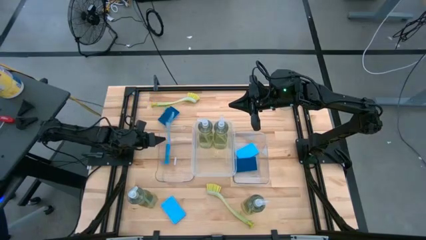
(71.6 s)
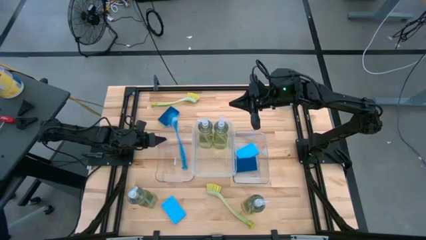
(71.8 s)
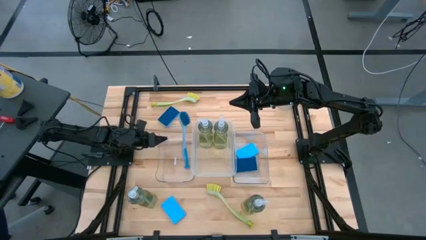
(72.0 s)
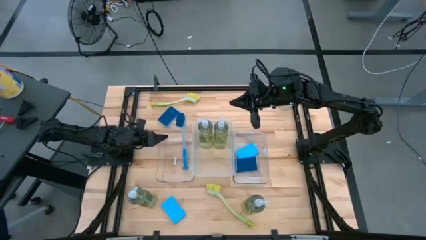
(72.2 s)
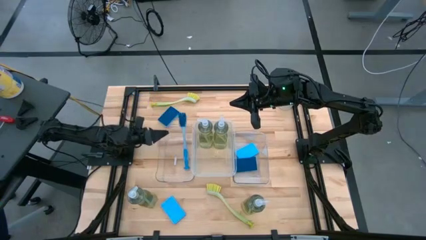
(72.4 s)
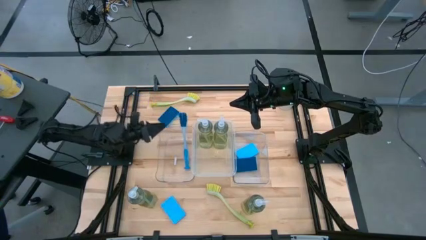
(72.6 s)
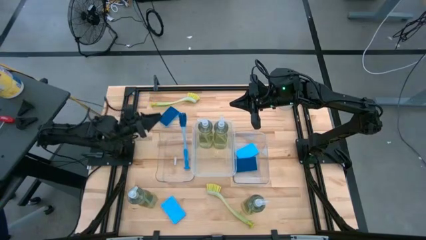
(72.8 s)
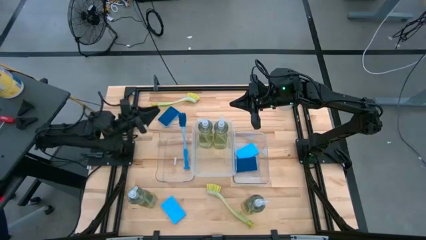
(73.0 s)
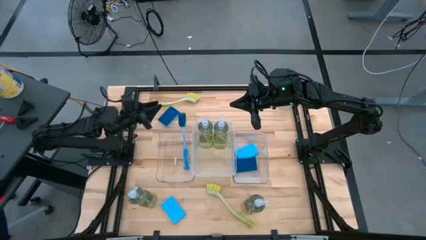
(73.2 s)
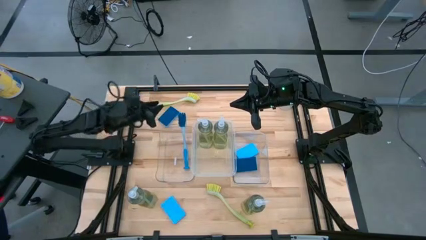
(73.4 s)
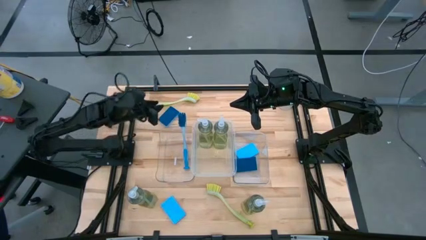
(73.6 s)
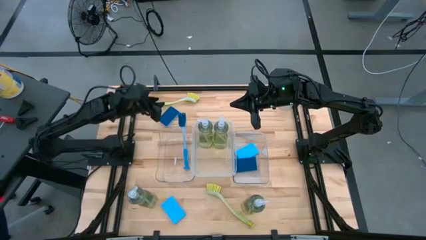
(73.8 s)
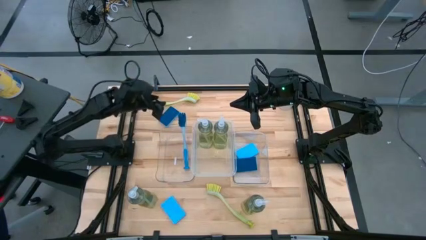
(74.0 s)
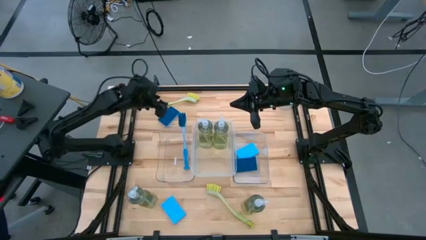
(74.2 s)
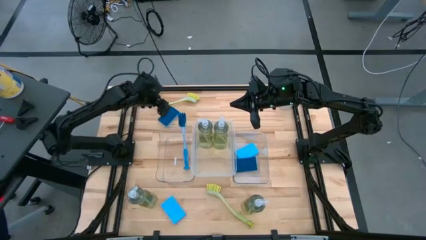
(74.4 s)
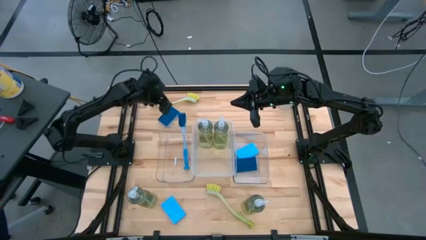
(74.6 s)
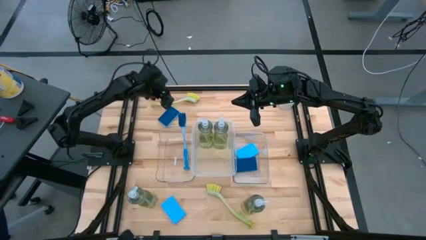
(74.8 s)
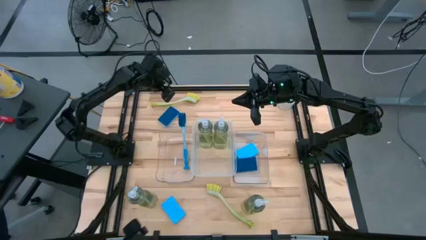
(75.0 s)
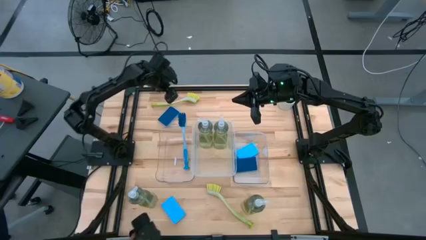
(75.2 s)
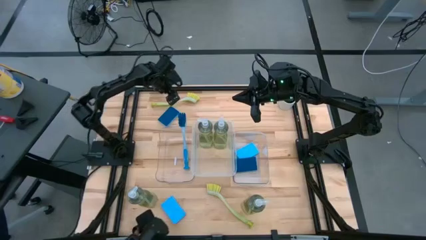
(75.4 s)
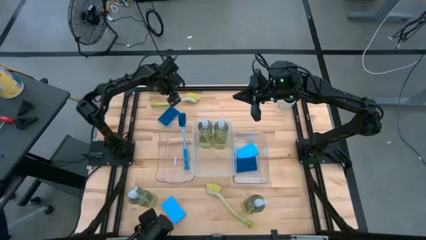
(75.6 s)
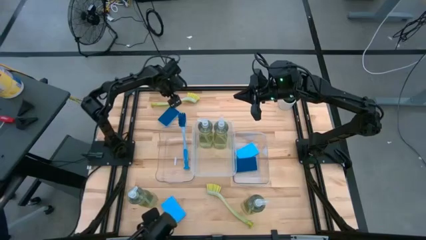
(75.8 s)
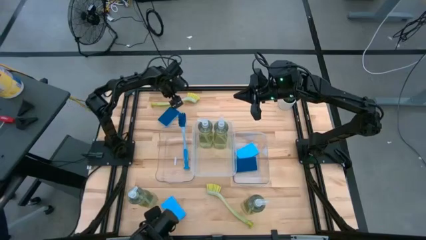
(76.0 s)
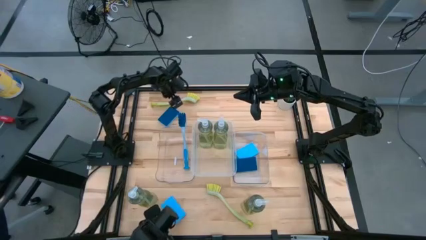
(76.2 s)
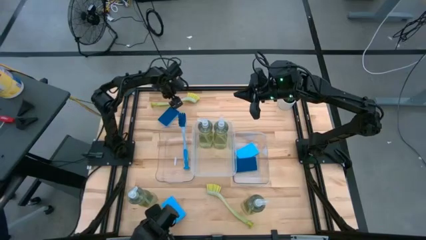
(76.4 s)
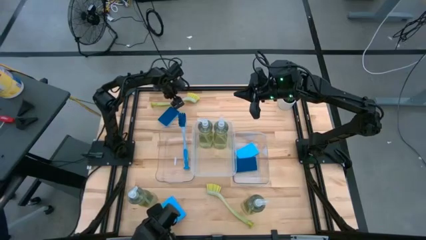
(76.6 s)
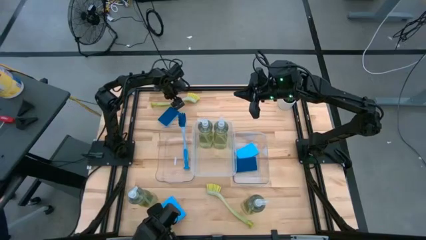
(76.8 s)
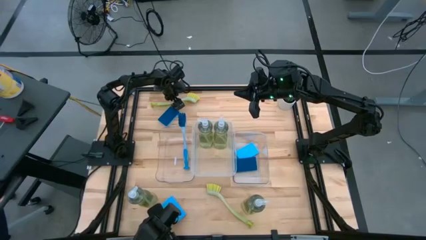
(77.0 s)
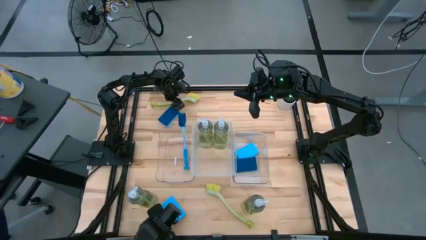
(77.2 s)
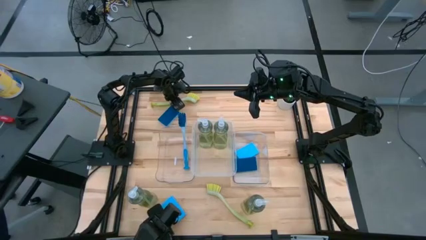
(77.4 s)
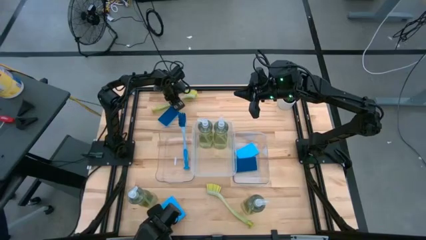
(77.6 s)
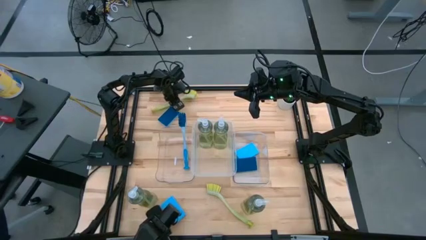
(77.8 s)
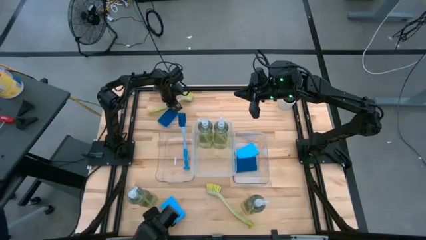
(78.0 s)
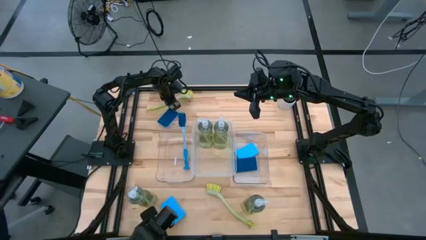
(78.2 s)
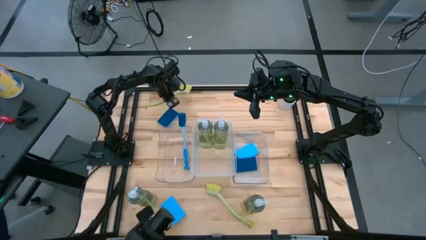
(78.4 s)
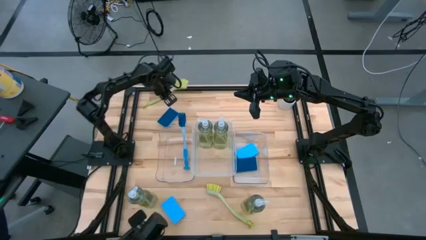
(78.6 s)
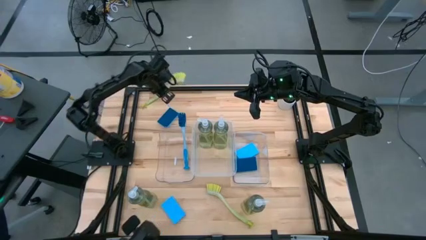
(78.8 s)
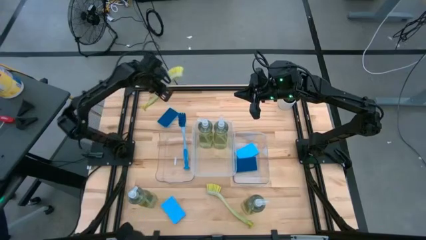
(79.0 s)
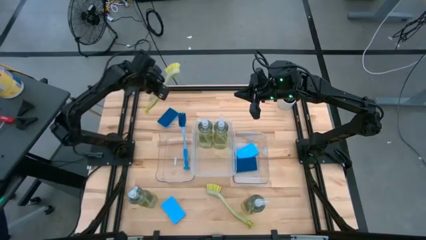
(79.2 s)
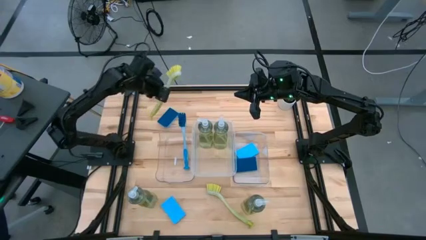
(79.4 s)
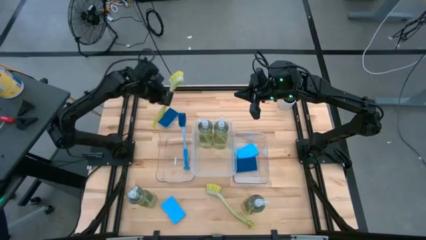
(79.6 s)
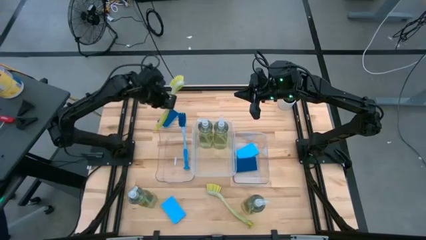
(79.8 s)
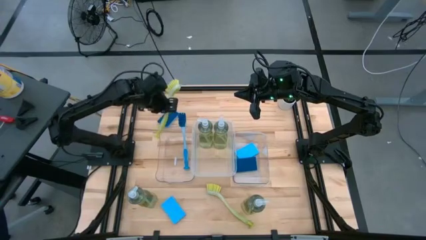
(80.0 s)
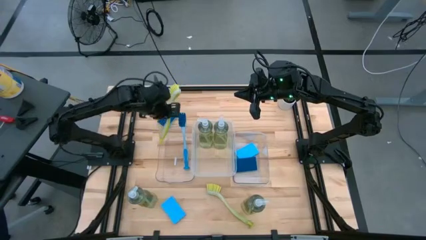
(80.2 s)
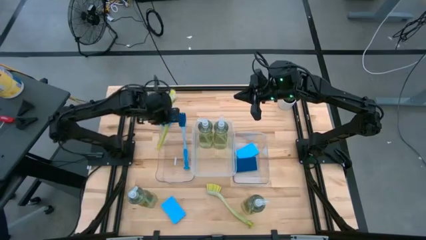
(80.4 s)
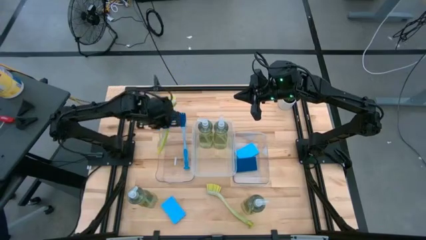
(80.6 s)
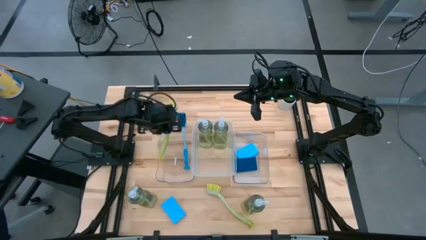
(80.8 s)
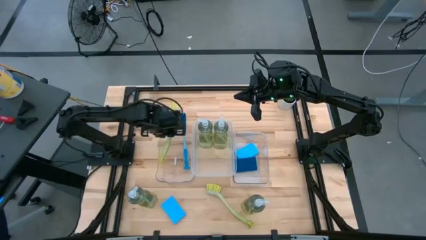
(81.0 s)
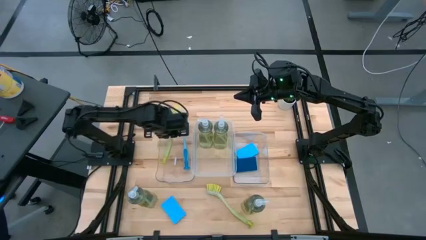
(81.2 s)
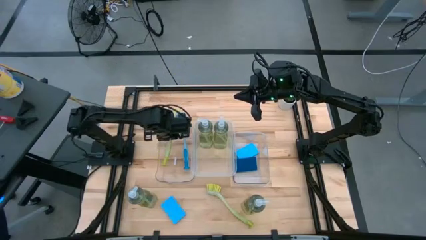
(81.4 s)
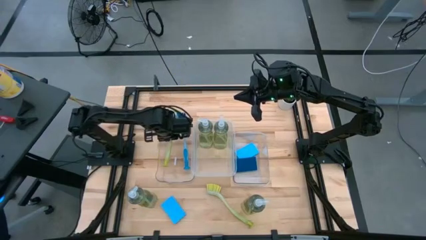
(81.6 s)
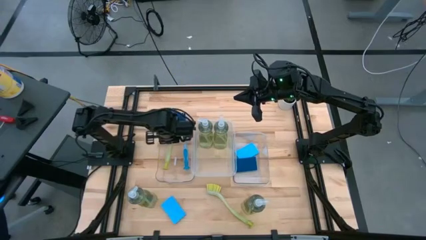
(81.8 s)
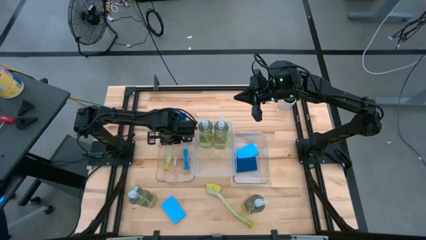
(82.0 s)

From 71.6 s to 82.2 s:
Task: Pick & Place Kitchen Sink Supplies
Put the yellow dishwashing brush into the left transparent bin

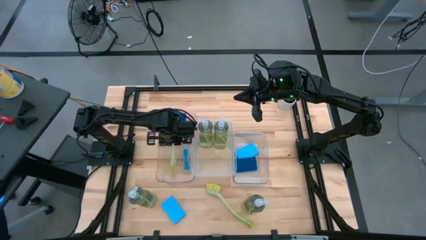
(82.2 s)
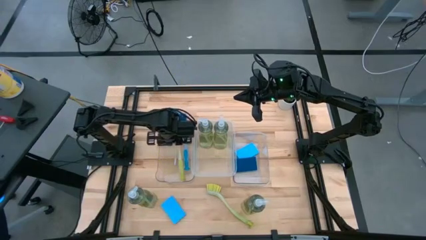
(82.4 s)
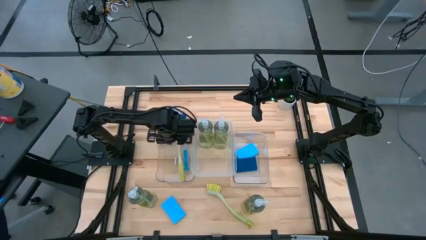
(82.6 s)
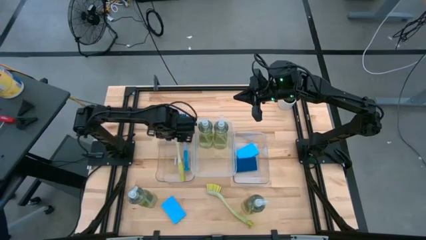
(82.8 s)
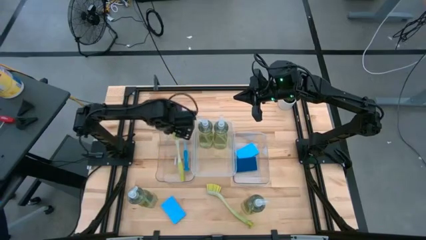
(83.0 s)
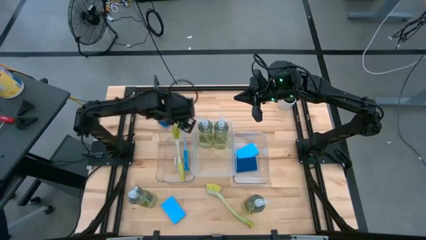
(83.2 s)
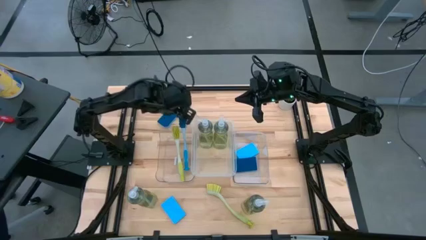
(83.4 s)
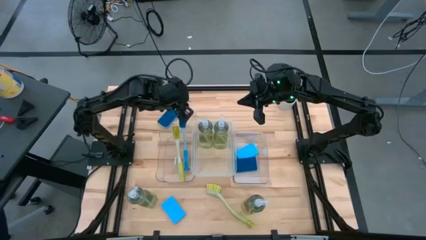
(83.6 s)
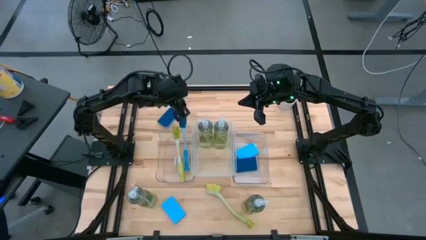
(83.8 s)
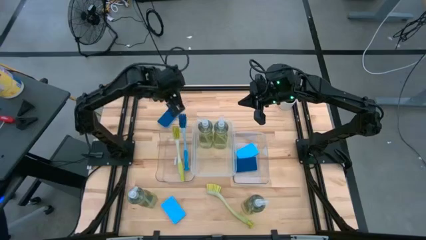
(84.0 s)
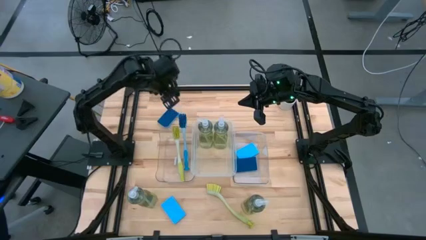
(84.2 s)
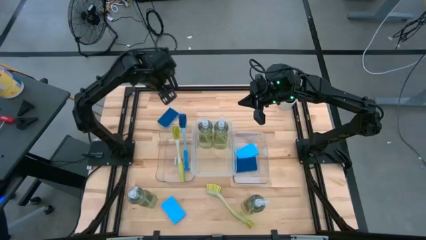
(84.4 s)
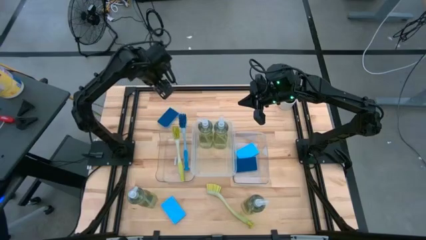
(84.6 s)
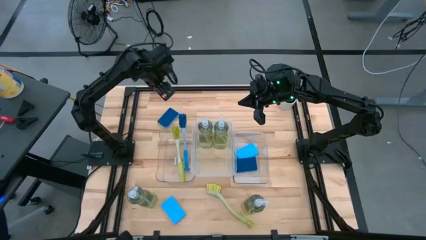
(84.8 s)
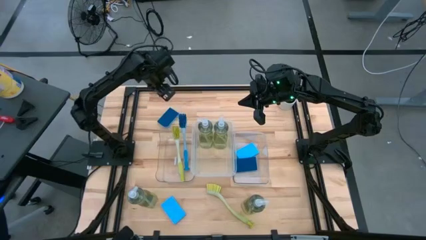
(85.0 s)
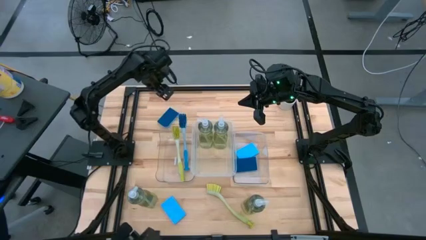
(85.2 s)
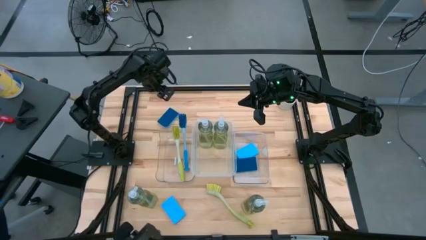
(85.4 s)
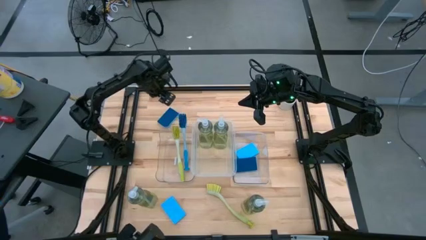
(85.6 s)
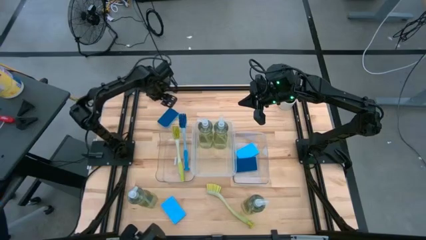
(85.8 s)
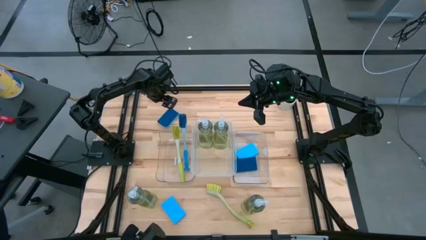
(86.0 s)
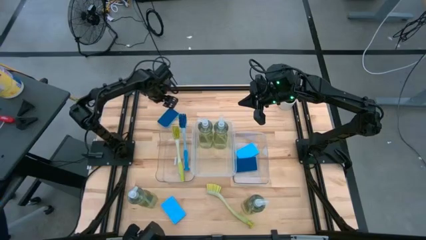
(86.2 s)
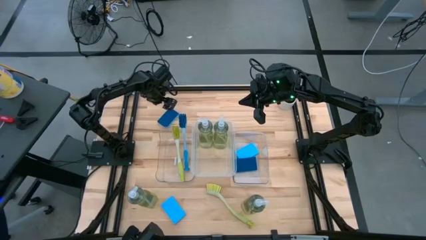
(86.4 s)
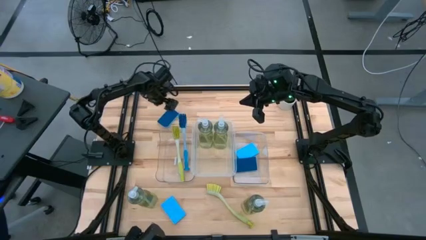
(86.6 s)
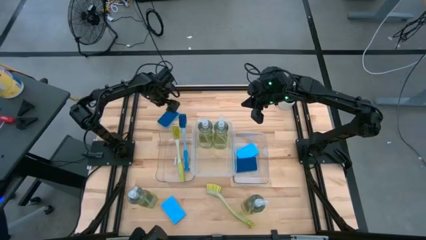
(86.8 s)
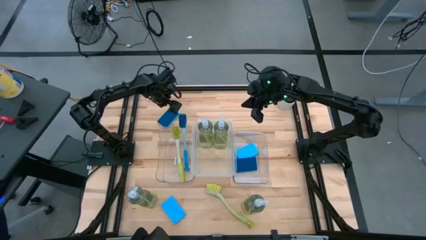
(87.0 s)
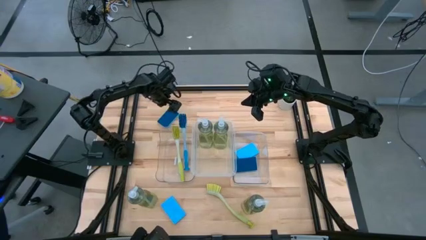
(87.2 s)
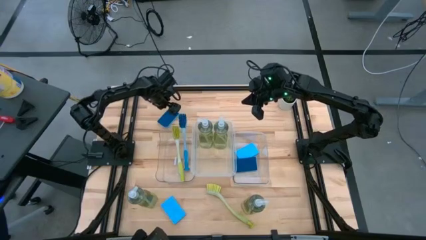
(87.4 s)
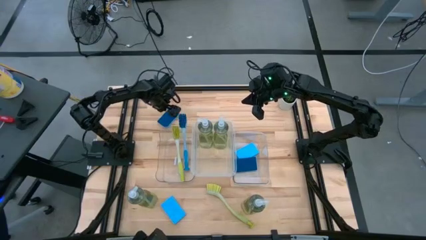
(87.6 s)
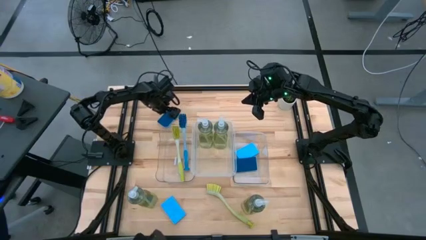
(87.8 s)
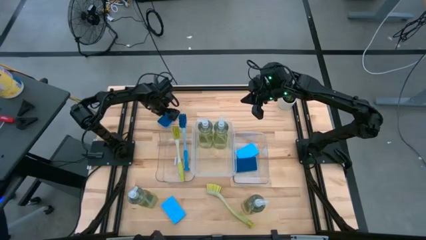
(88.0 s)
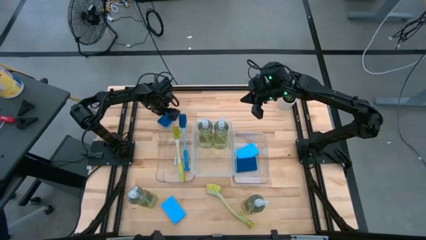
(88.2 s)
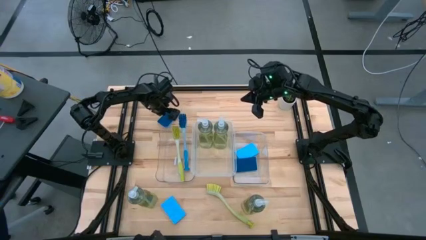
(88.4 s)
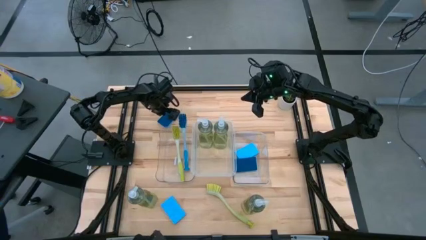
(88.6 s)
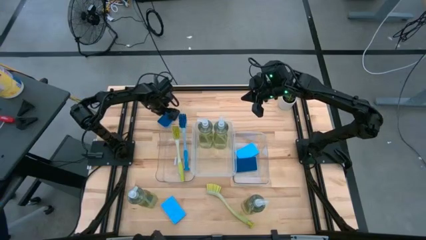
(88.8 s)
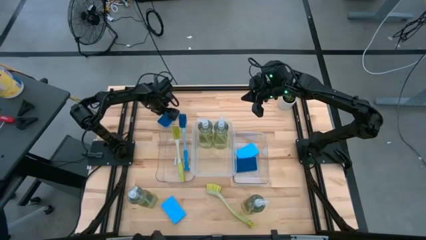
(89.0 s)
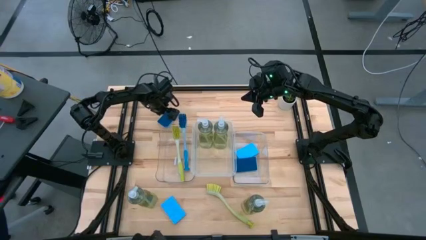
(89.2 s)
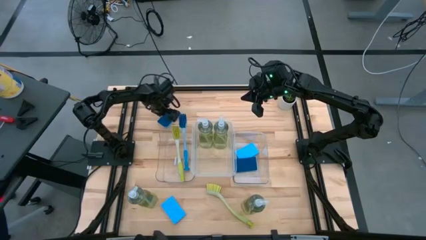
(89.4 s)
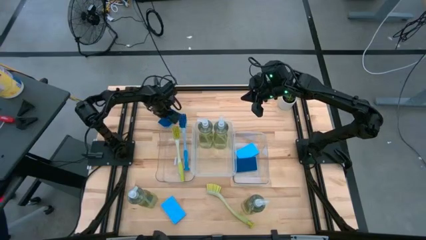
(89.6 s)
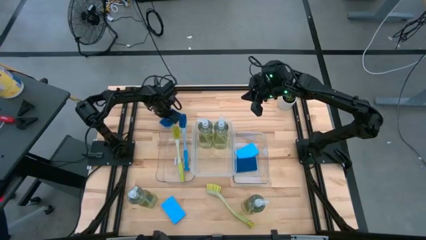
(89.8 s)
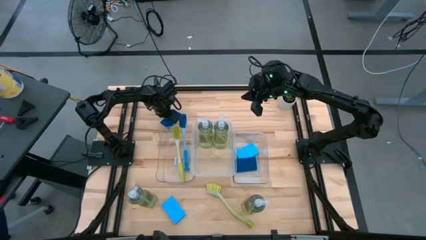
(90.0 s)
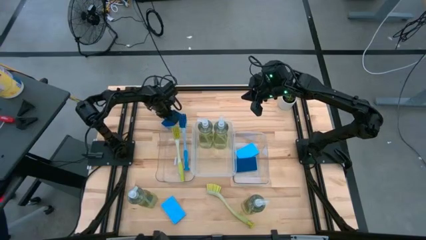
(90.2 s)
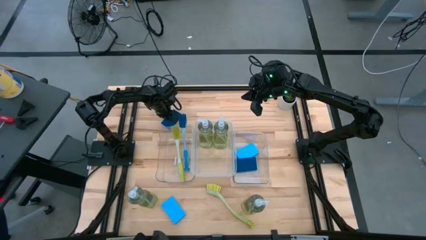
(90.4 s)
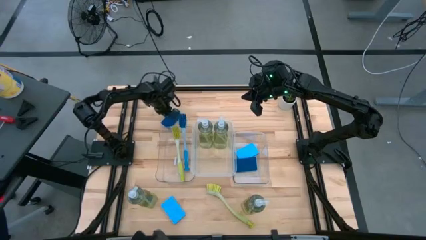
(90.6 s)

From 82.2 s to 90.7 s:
Put the blue sponge wipe into the right transparent bin
